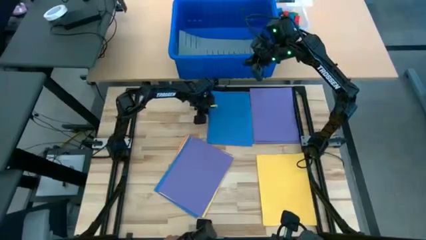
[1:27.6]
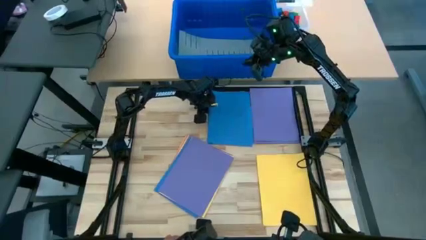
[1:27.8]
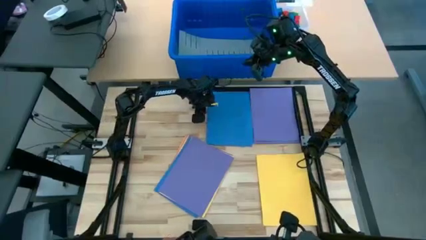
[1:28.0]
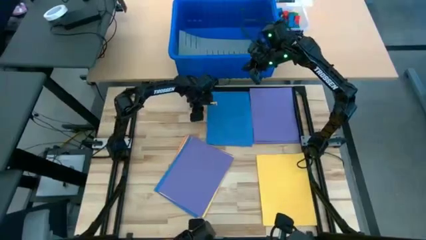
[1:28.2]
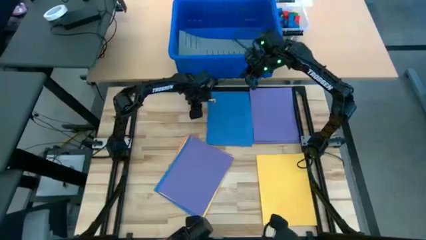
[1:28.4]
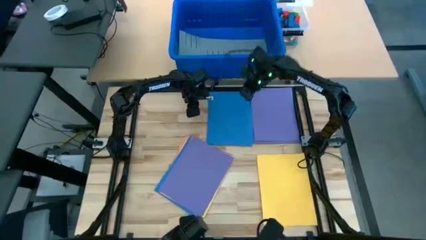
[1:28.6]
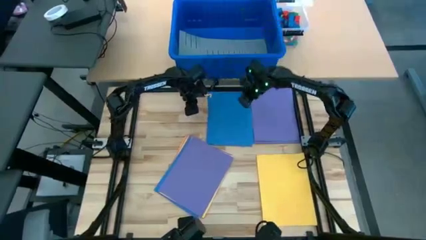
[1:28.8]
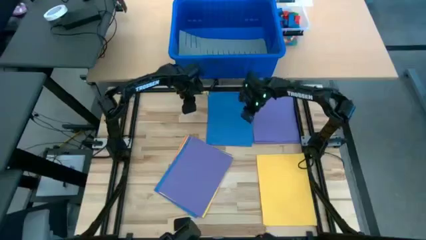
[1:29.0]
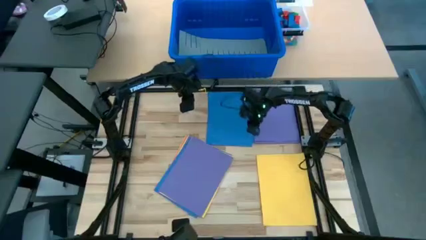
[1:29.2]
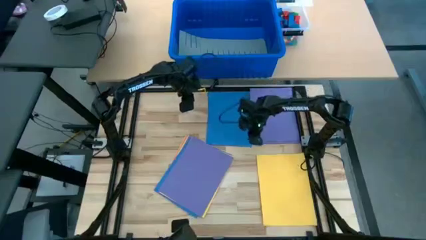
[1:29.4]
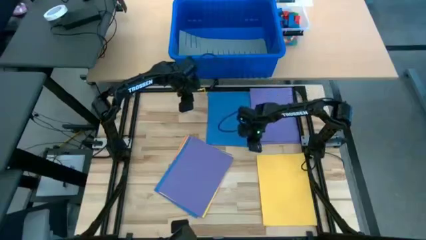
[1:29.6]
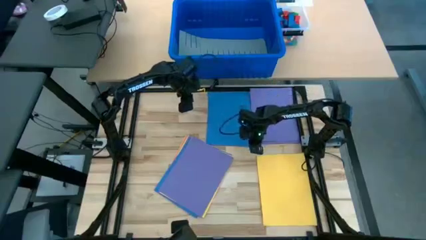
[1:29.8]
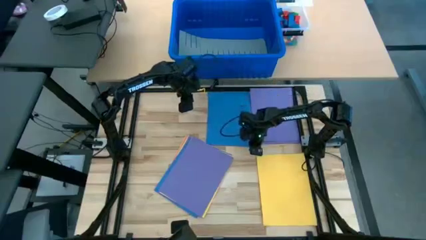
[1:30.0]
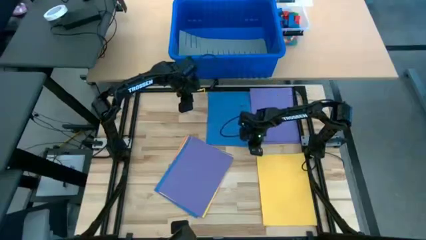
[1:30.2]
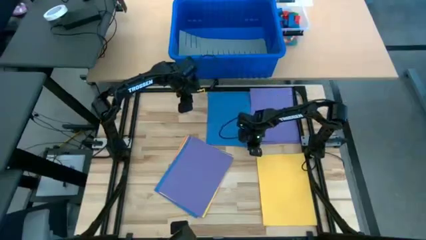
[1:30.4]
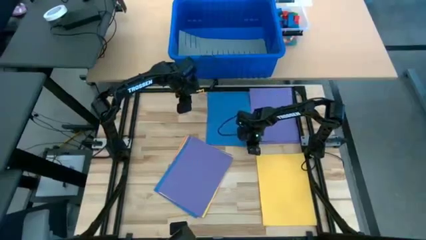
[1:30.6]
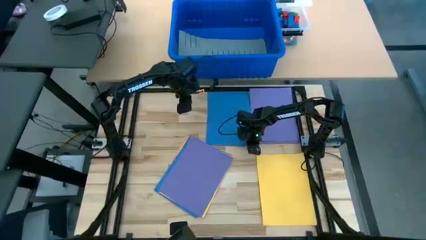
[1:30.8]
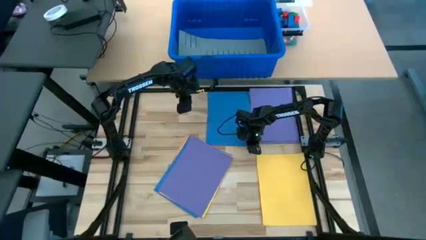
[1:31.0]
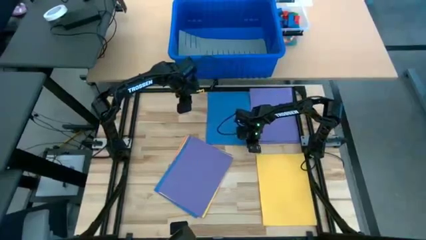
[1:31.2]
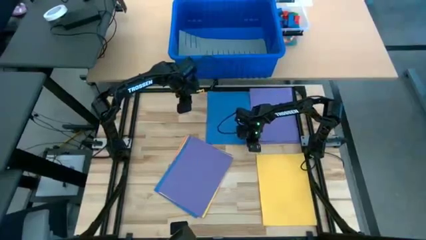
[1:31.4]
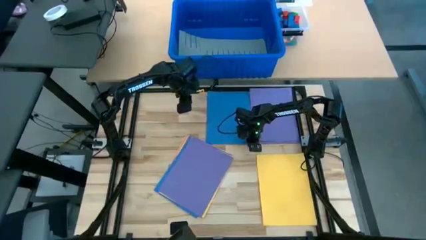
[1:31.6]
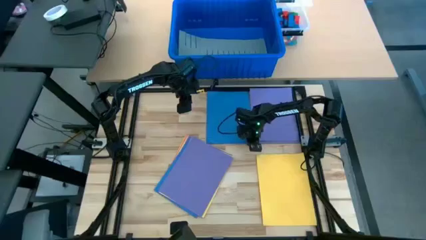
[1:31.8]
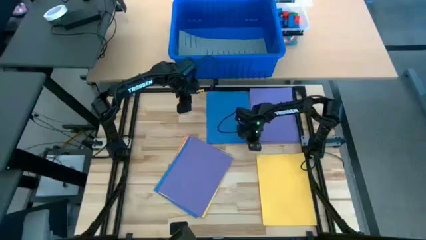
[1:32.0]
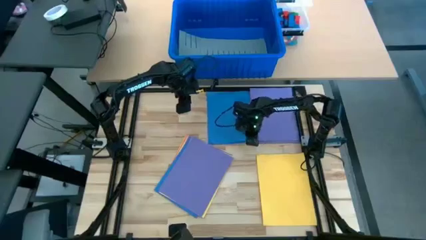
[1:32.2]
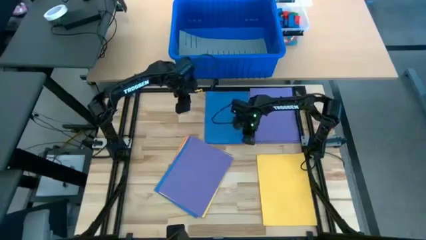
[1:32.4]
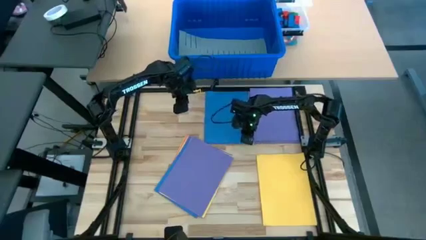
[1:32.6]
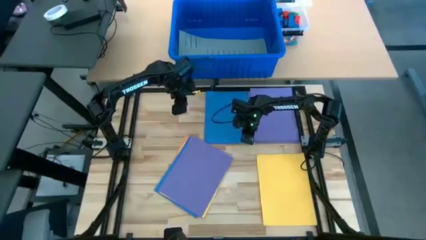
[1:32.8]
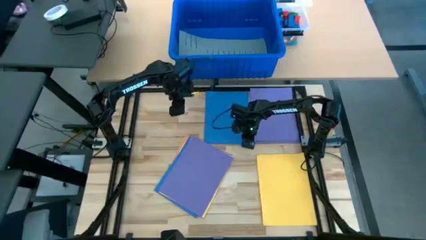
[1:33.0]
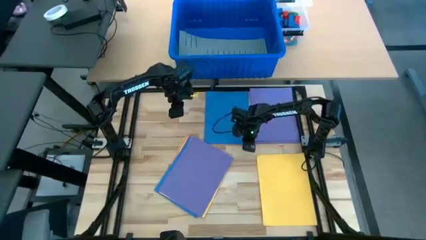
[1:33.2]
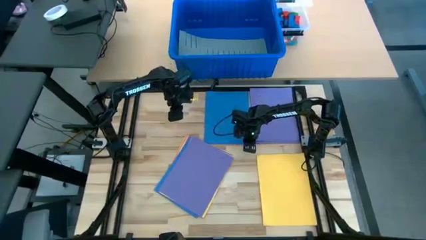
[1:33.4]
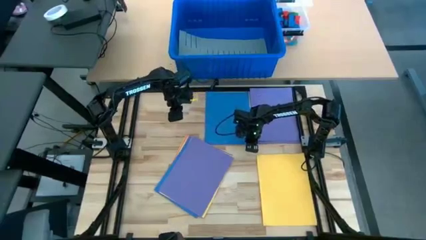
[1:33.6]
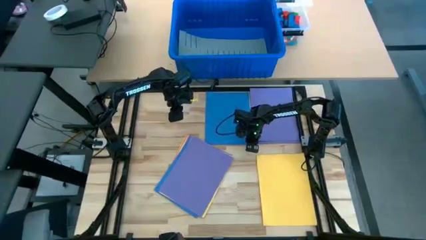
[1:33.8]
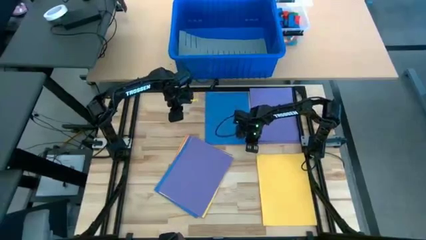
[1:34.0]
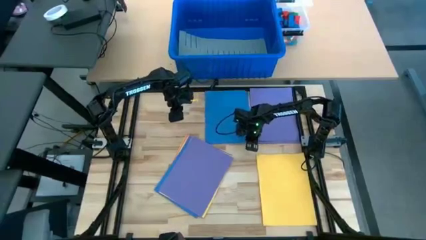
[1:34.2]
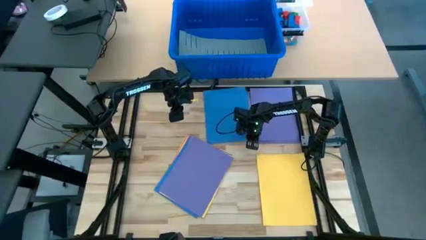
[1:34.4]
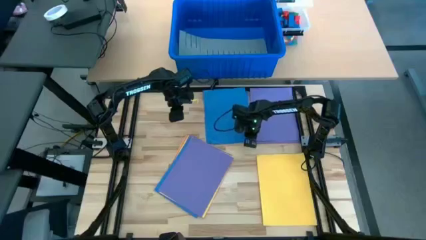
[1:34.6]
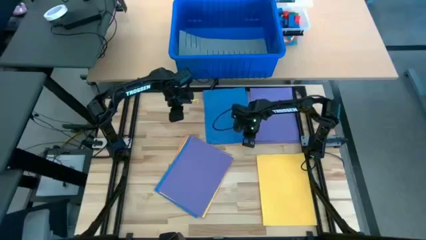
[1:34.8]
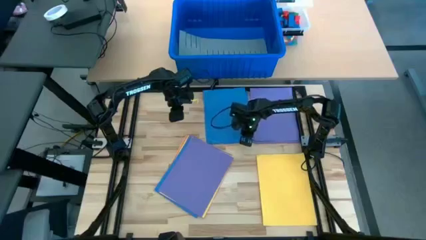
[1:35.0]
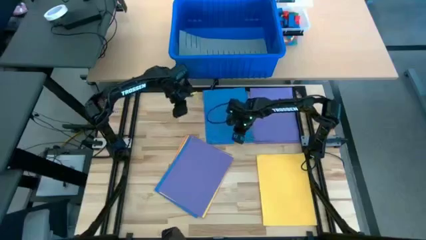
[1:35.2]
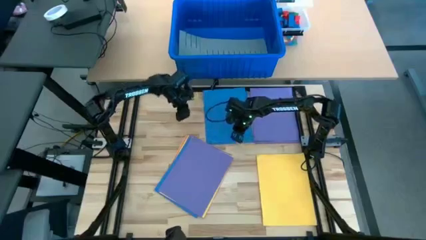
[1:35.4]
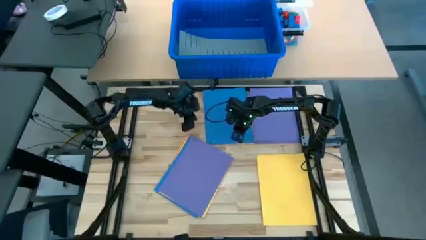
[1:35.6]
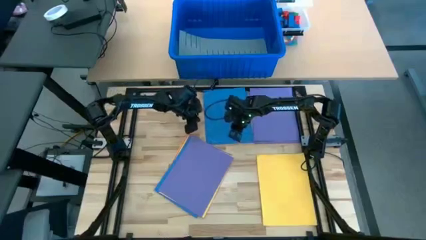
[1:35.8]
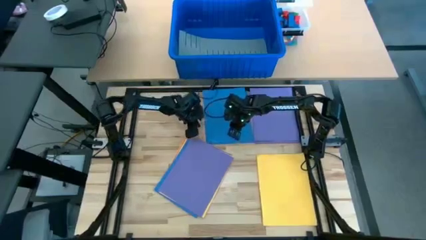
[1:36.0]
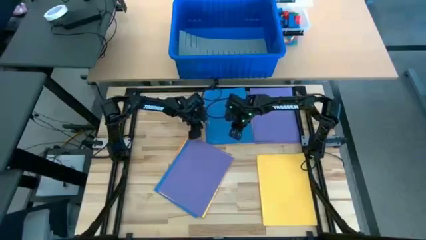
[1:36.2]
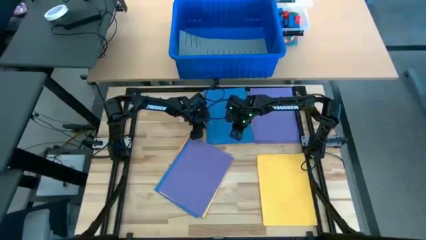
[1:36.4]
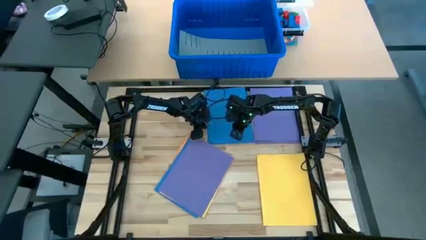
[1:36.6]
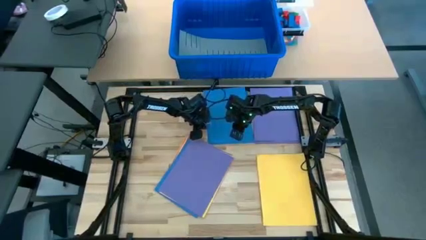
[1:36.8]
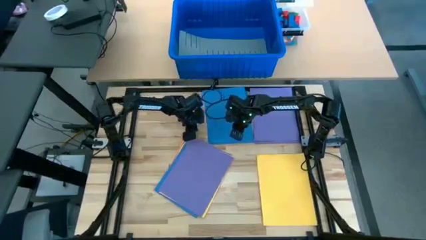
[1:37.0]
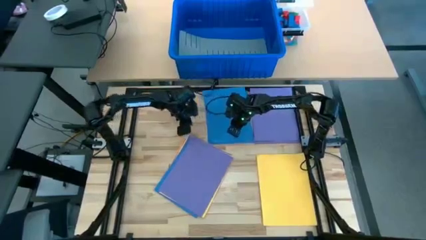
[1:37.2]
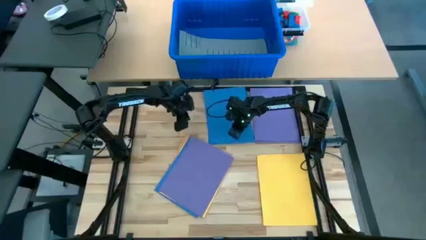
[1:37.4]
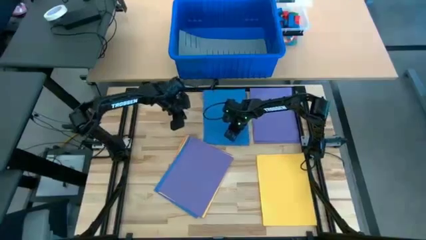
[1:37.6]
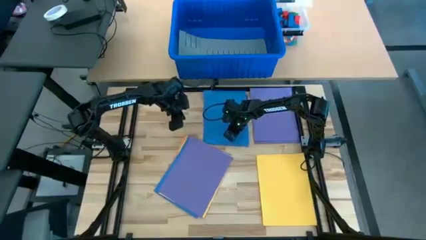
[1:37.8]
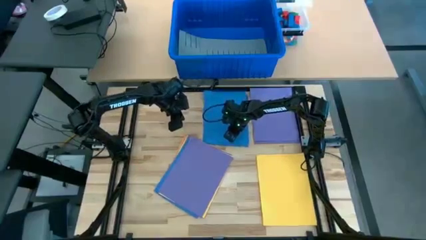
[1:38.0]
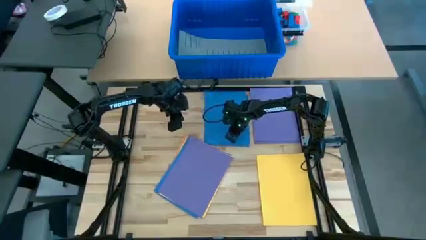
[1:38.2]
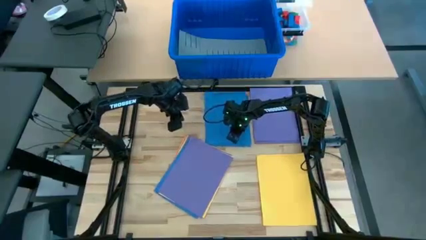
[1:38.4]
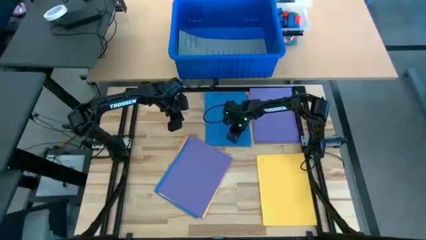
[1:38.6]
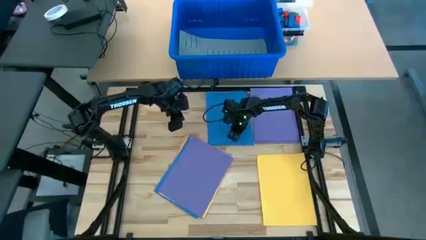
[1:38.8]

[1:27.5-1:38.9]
Task: Organize paper
Stack the blue paper on top of the other blue paper

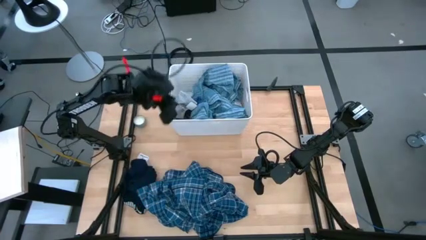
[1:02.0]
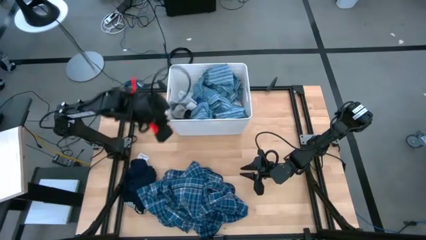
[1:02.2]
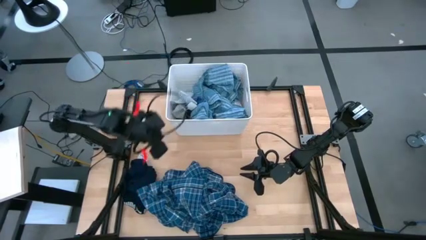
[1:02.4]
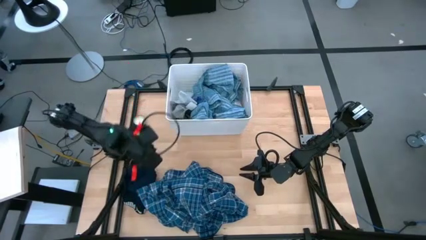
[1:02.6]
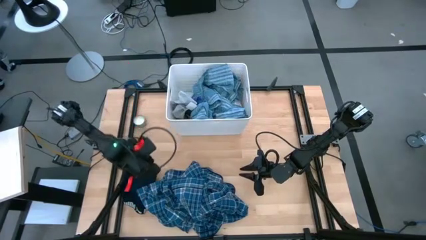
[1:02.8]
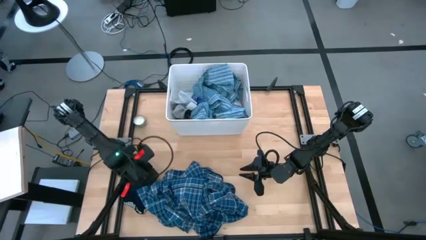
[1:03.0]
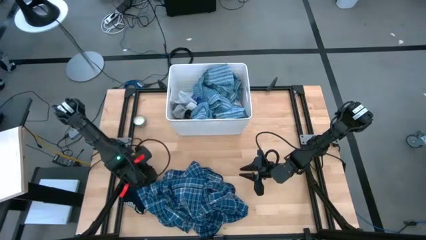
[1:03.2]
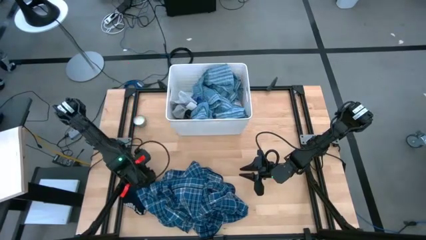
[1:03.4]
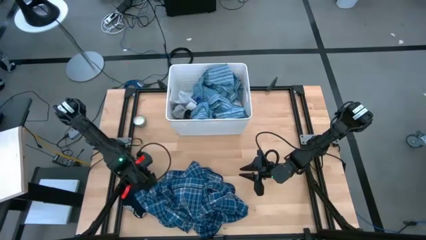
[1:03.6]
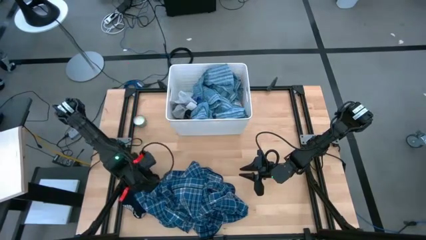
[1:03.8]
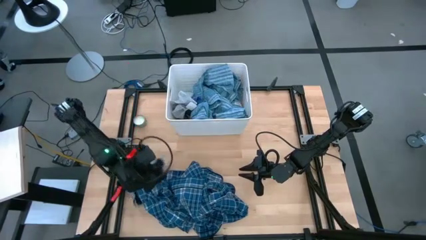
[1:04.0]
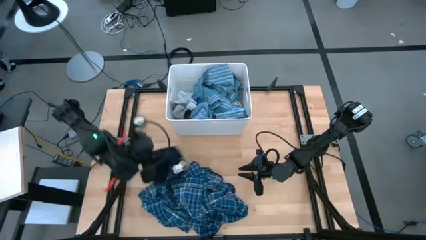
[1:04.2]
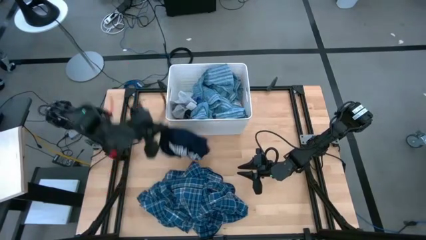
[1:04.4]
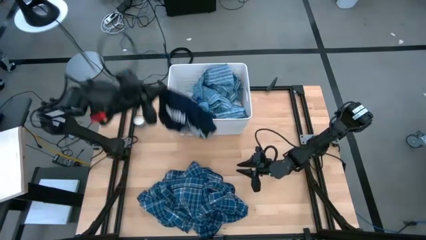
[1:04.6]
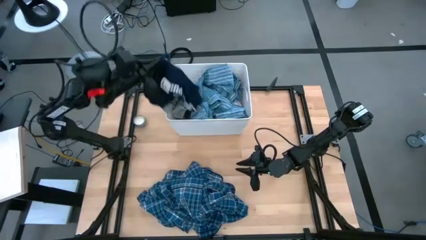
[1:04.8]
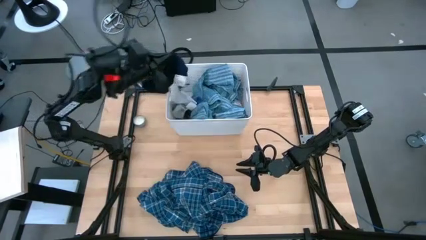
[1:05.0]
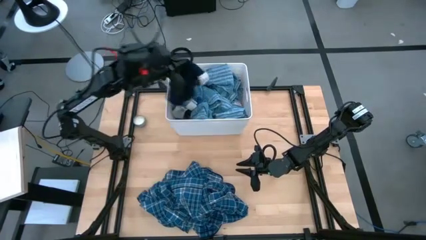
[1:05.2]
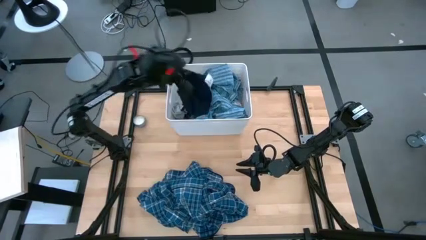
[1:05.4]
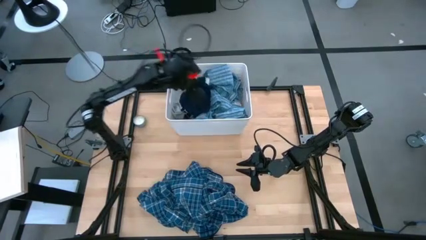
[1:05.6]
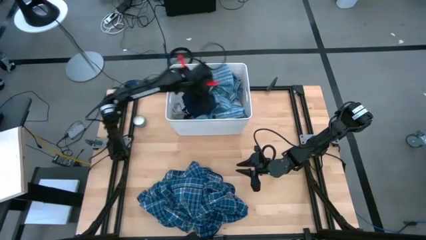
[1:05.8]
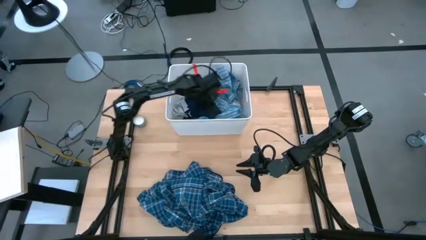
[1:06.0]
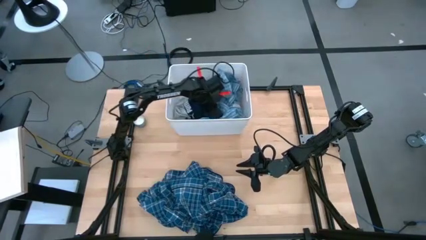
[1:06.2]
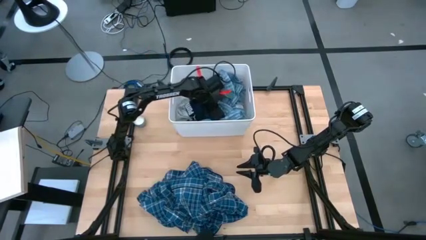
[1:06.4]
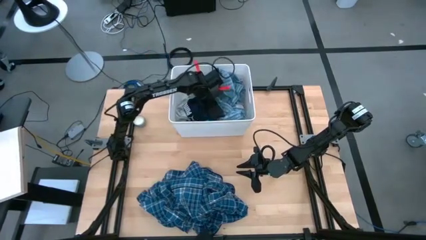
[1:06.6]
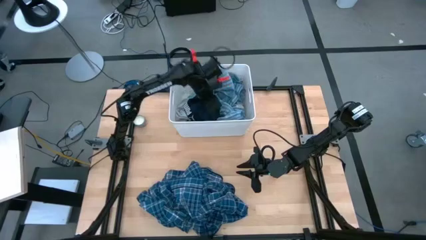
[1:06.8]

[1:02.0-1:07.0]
Task: Sort clothes
Put the black underwear into the white laundry bin
